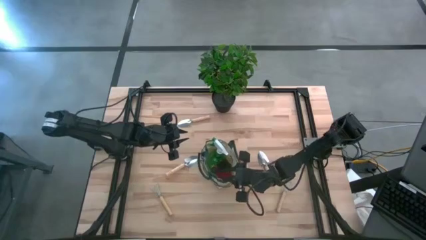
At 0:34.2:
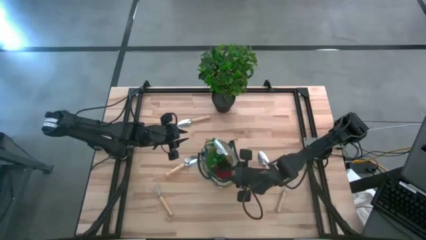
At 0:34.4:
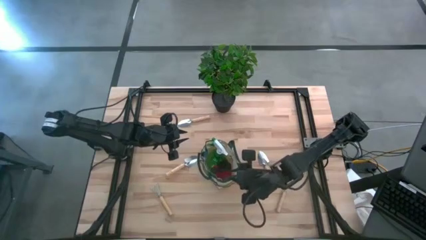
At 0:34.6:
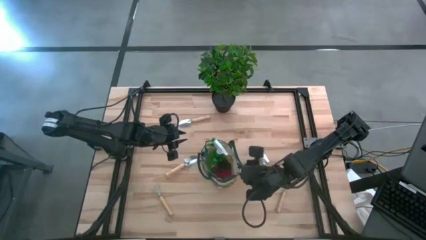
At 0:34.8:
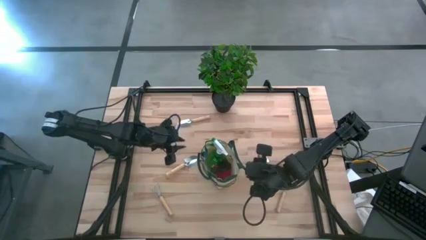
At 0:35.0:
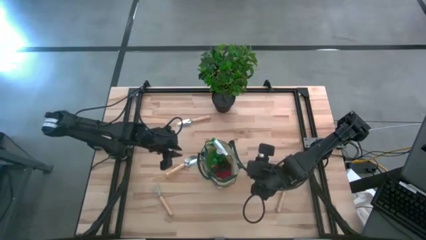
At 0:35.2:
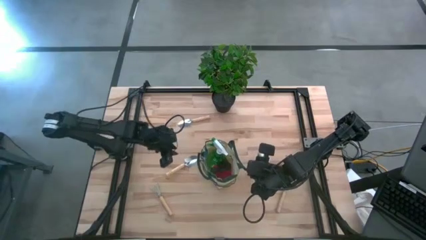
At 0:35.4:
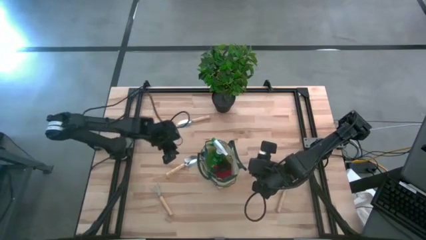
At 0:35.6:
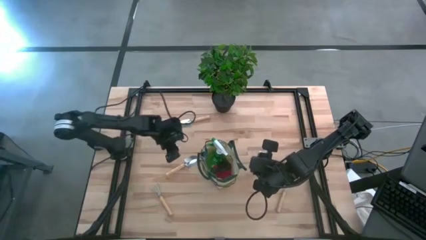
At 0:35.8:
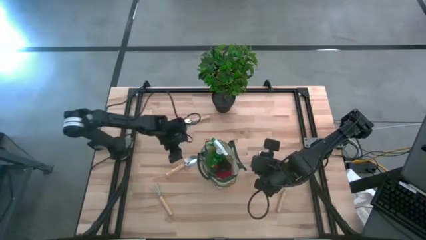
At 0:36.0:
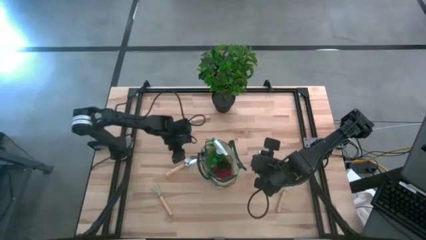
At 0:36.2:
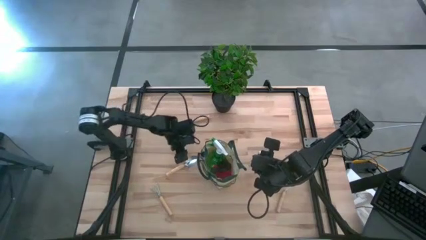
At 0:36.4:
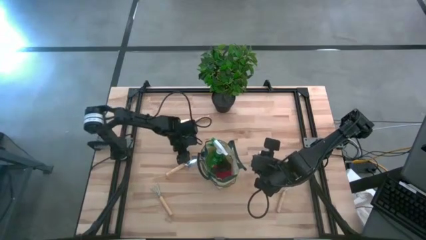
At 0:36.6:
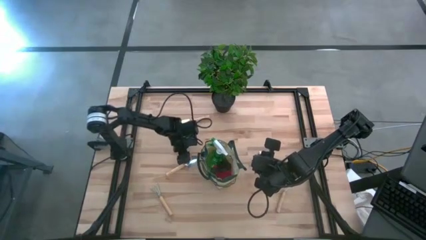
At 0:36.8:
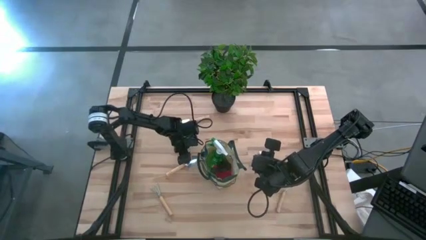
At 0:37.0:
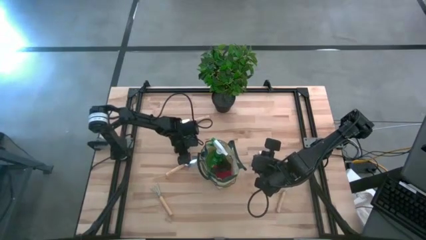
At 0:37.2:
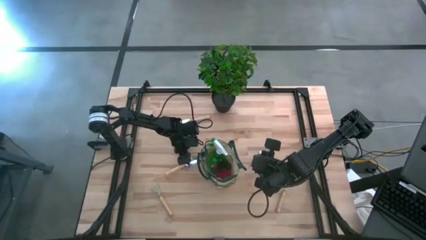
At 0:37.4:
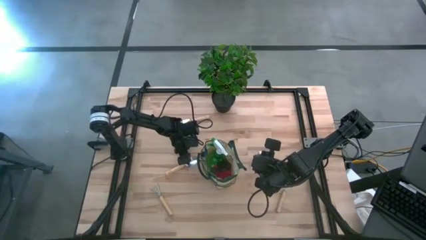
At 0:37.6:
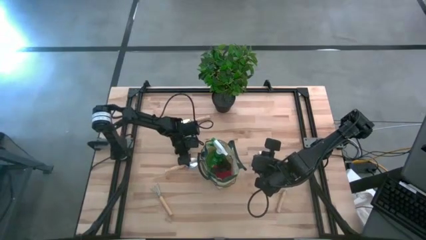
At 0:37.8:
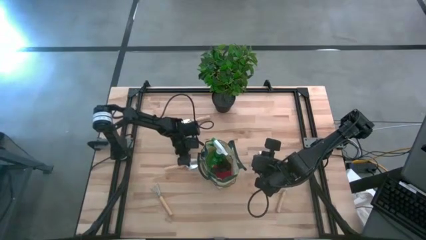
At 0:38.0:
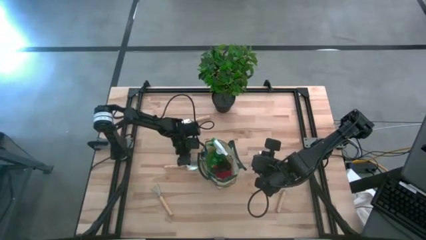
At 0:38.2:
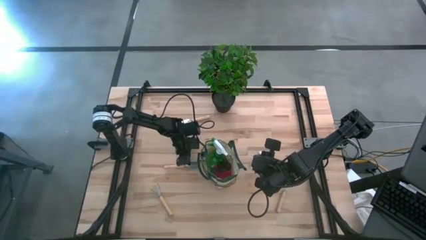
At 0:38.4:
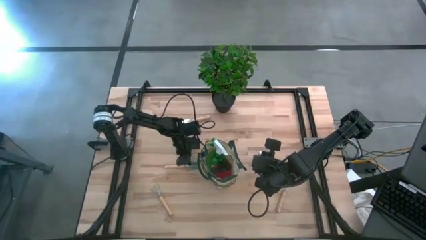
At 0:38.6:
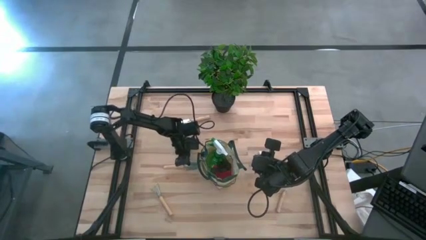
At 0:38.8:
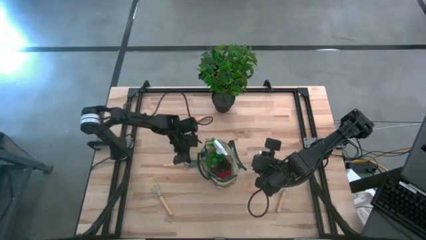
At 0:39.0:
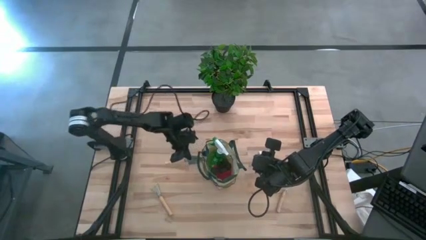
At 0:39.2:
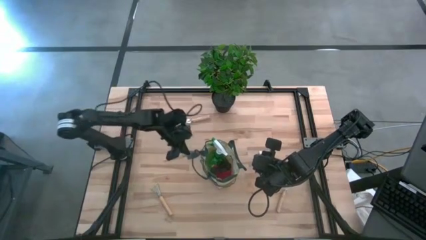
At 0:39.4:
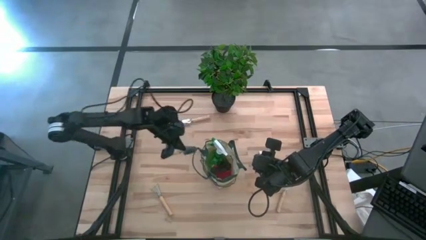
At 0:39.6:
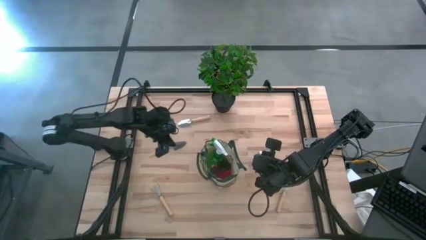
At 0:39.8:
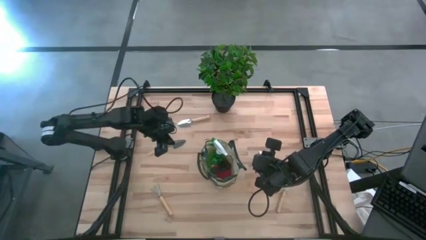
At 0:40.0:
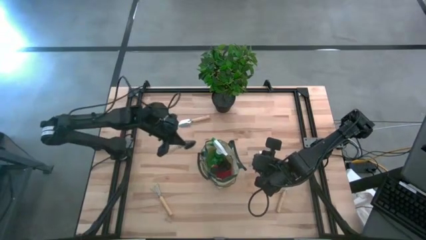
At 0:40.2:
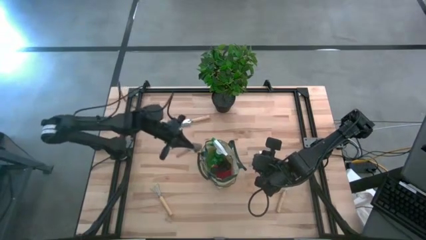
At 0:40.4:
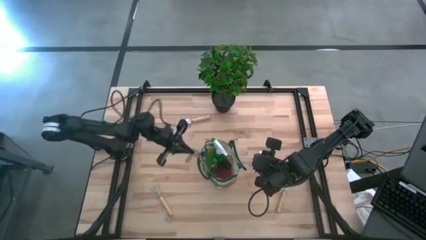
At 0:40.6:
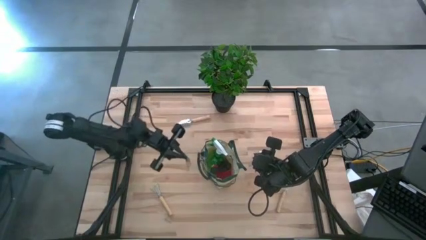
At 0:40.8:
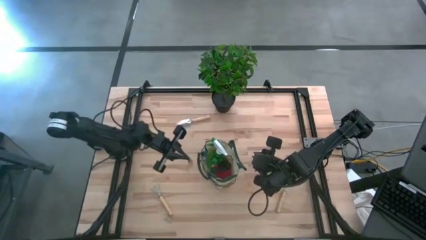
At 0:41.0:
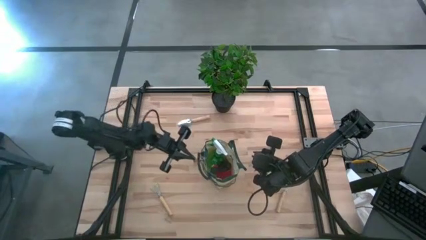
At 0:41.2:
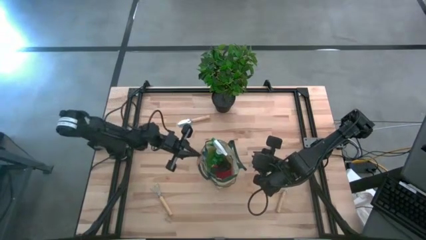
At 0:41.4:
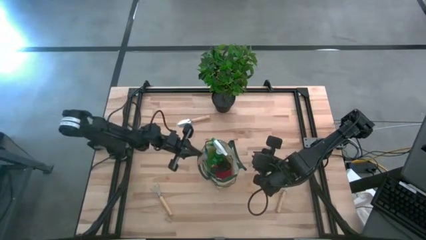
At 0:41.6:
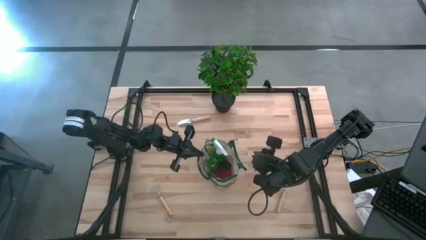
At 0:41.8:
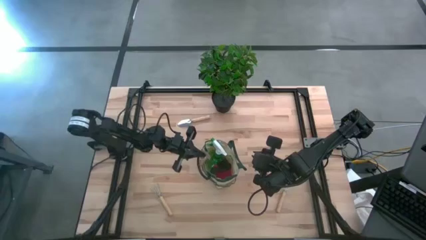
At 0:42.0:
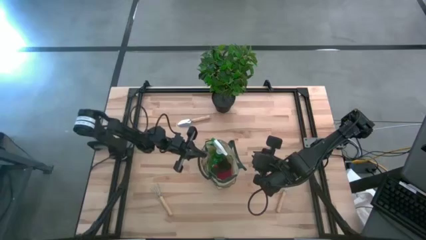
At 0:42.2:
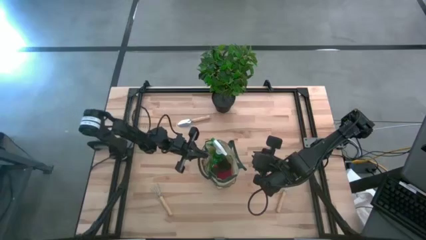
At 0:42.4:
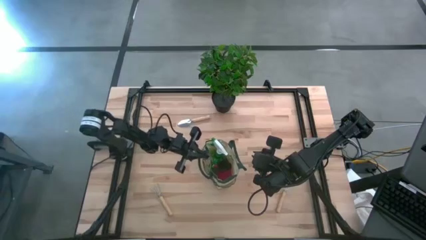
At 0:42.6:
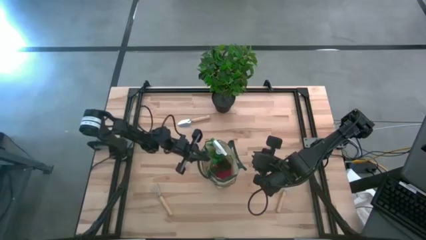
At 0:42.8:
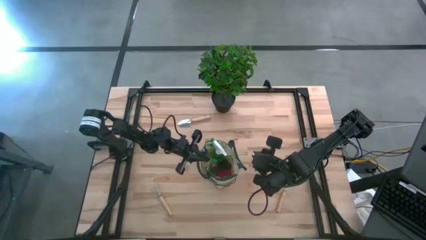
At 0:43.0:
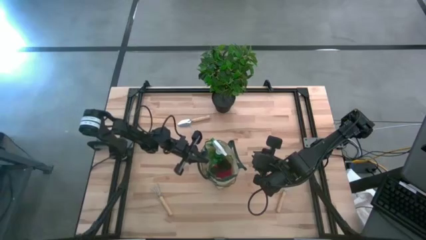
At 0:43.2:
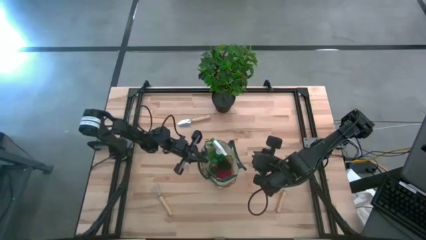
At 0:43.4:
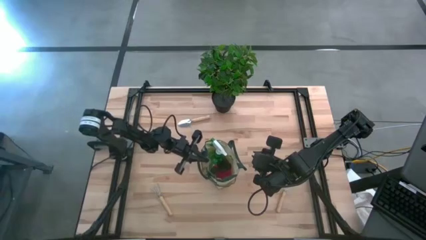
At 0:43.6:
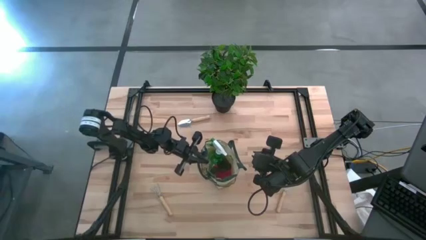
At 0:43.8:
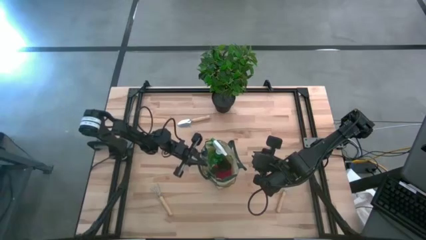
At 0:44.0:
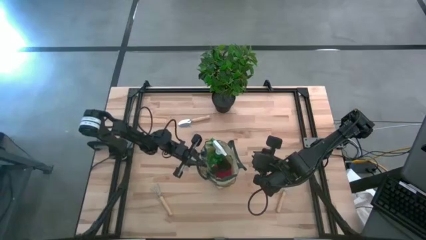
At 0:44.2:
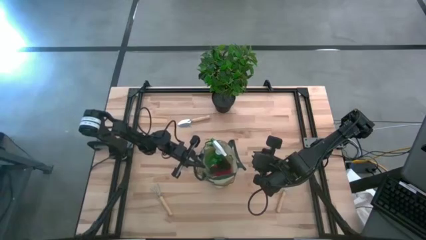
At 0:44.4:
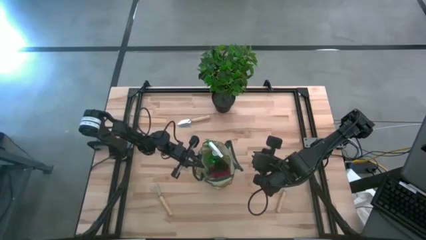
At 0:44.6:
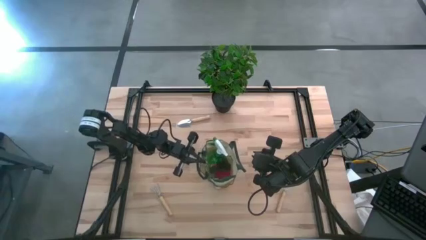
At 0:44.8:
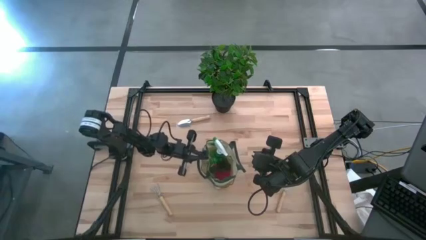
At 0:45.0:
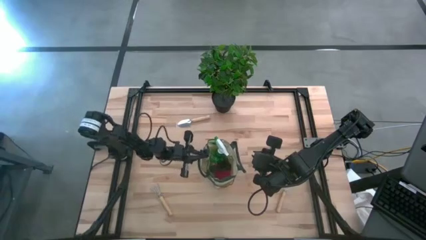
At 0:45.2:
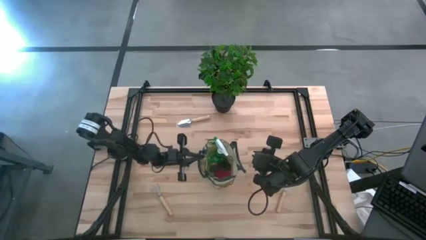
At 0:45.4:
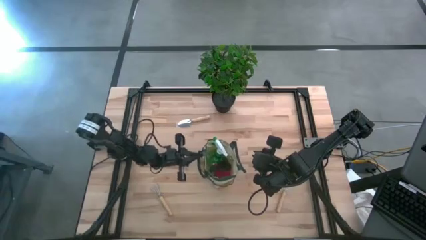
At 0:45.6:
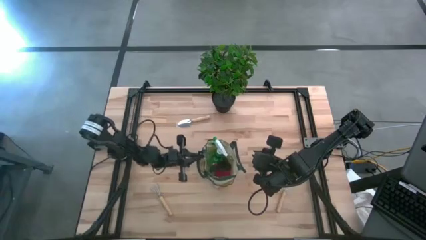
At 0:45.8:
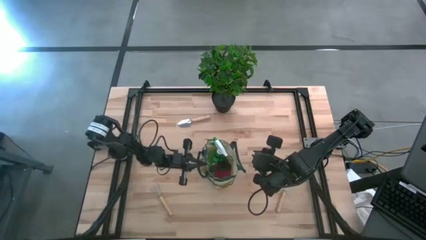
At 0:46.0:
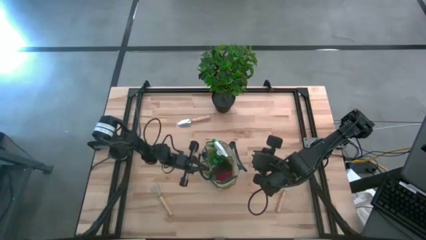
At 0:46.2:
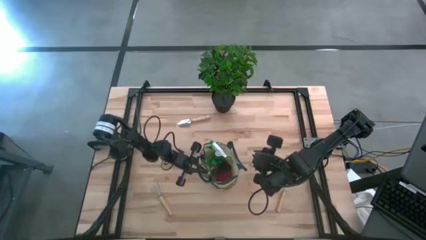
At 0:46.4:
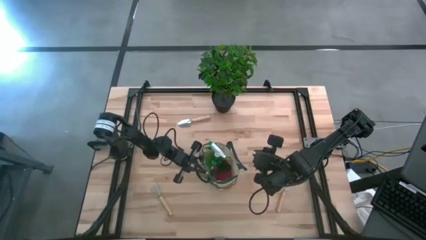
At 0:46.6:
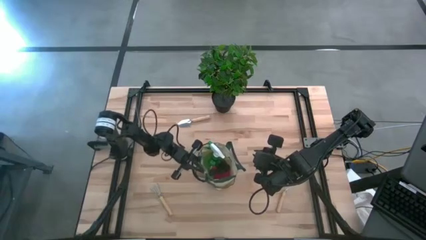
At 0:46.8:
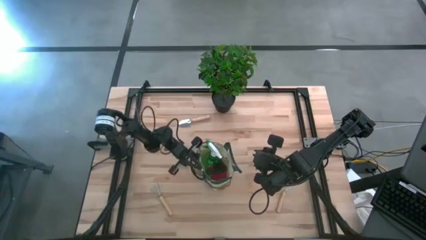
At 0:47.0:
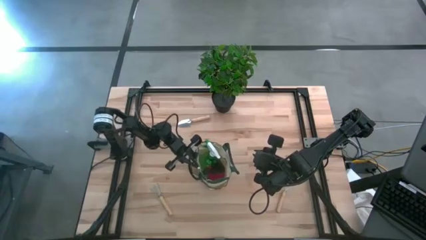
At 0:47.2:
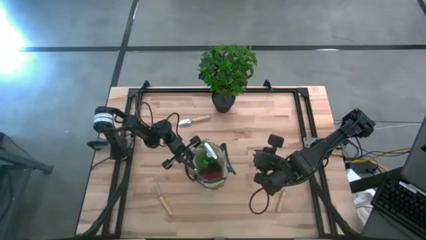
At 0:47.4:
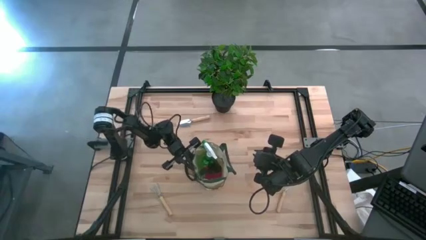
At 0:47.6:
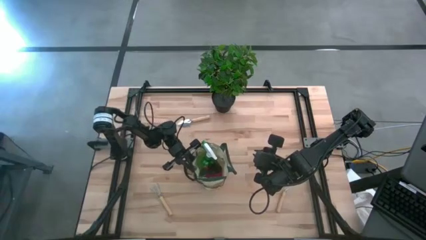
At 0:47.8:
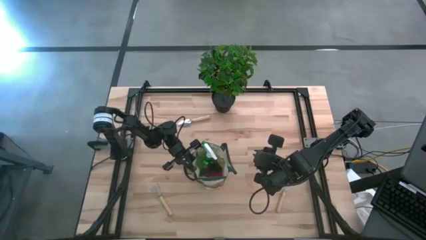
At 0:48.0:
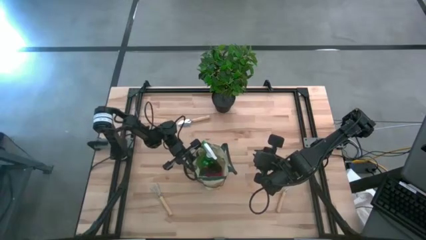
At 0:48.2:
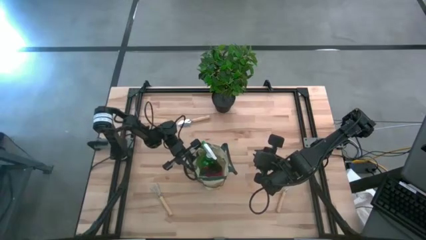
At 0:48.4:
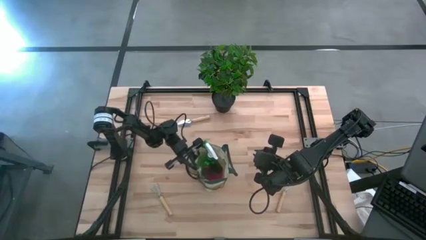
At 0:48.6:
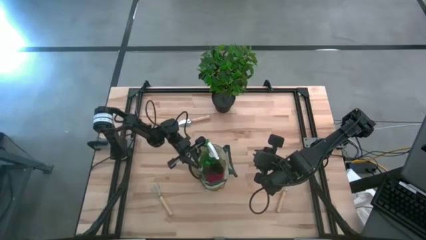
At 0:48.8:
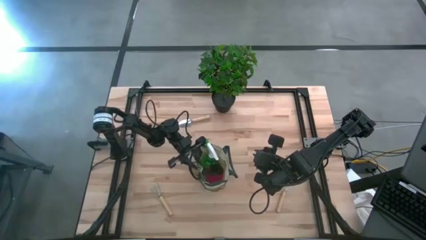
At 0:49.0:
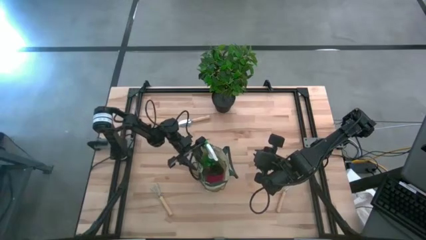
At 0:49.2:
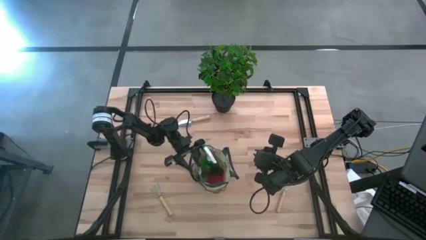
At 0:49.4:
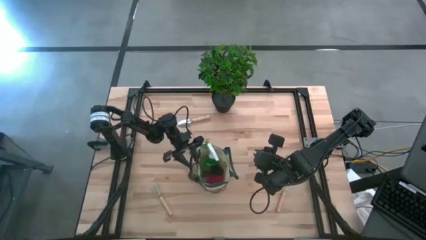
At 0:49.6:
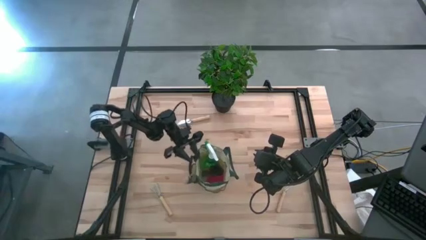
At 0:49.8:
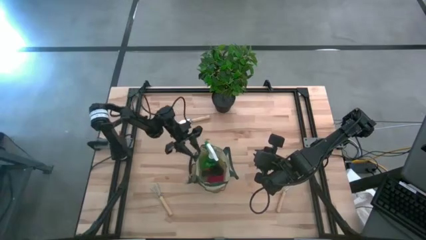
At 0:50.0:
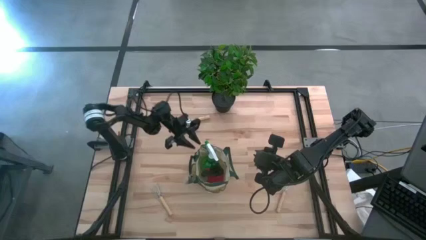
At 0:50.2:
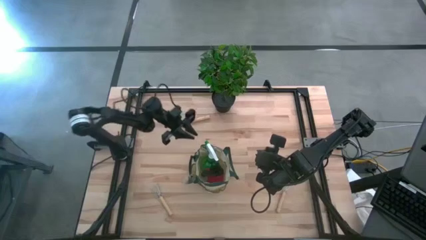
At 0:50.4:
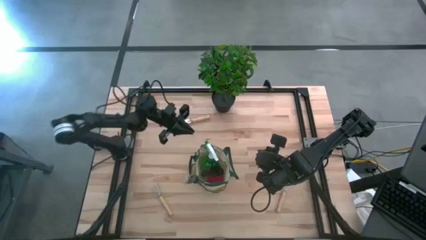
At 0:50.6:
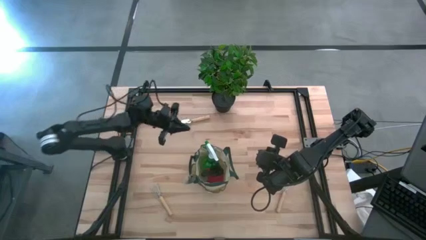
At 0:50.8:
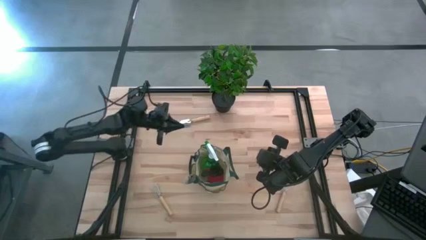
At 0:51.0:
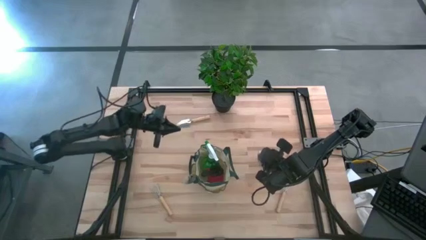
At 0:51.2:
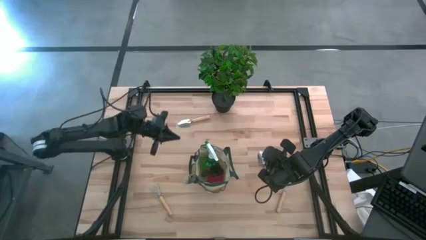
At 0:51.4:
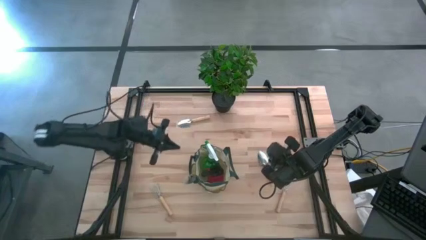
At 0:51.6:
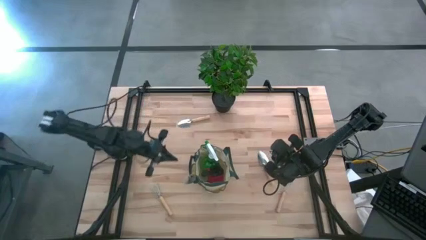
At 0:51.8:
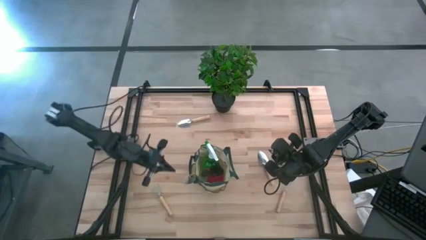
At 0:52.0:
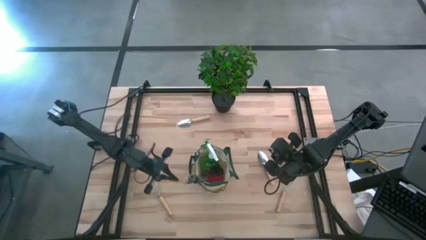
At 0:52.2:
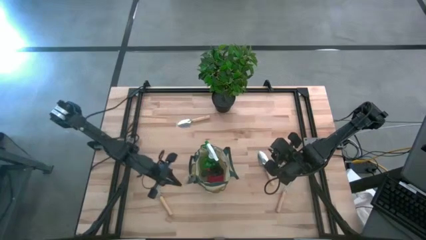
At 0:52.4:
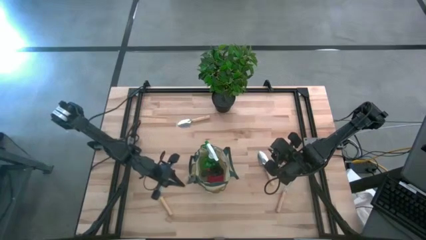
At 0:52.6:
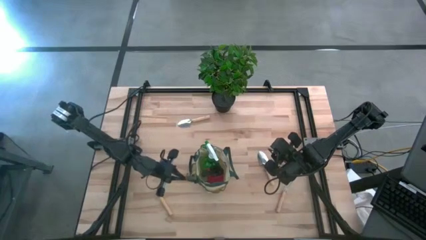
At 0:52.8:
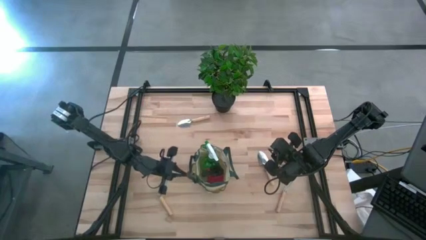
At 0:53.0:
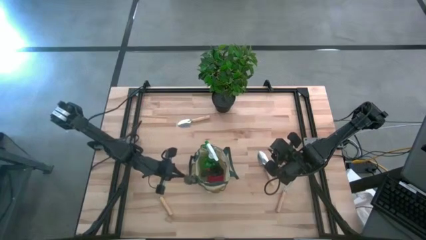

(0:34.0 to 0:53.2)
Task: Pick & Place Garden tools in Gardening bag
Put the bottom left brown trowel into the green gardening bag
